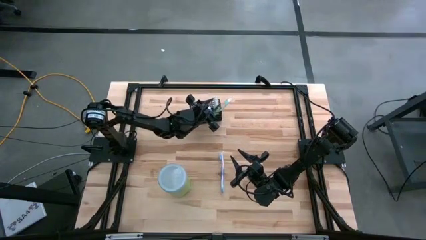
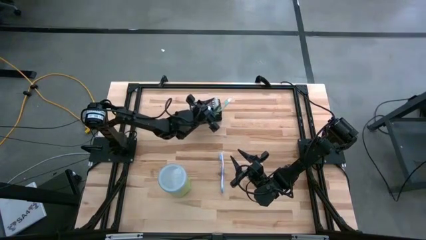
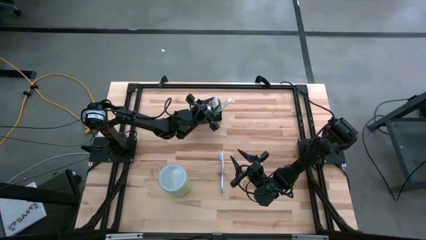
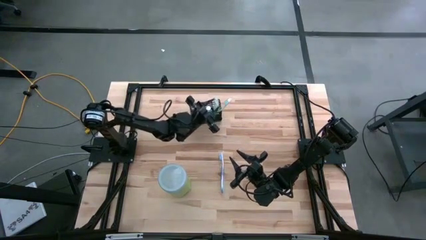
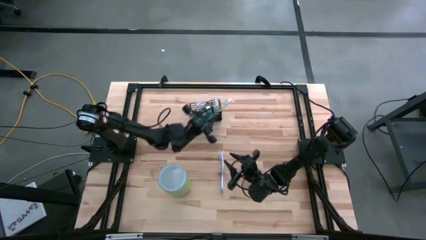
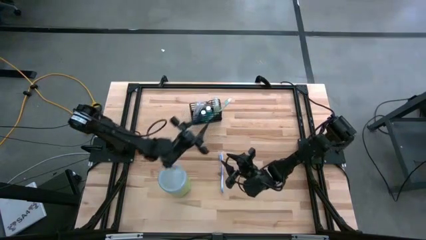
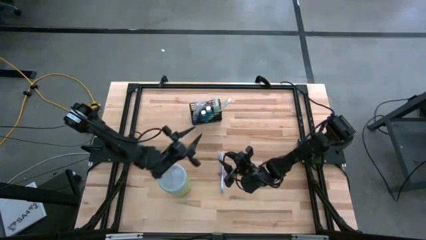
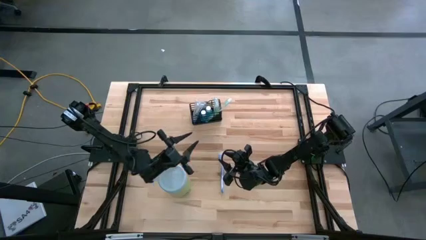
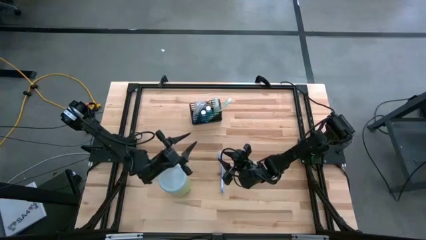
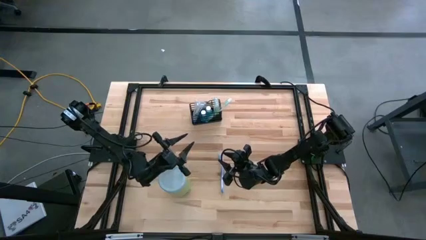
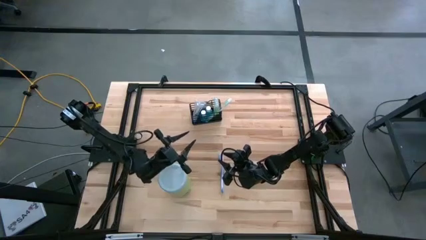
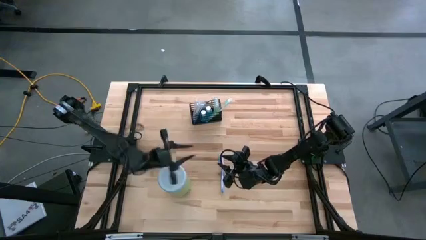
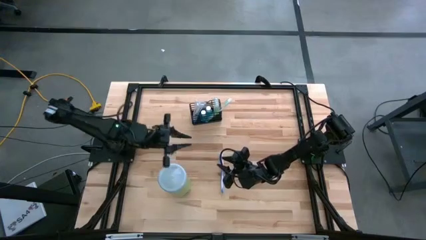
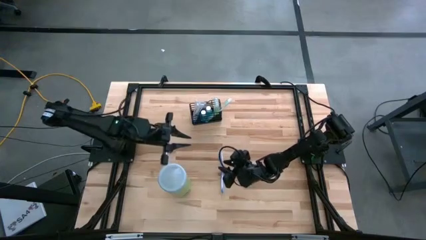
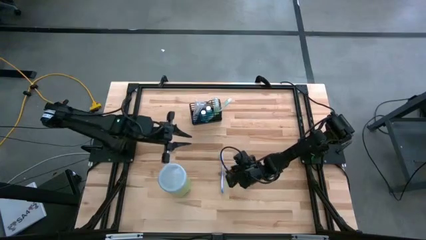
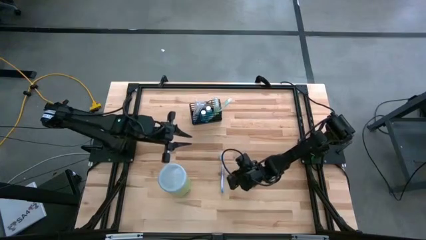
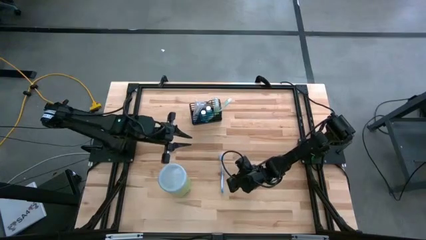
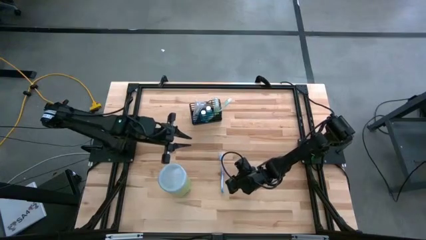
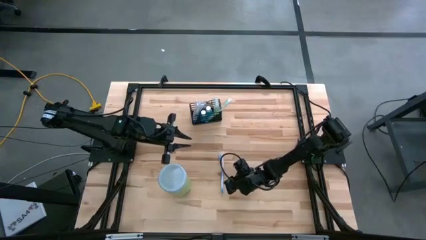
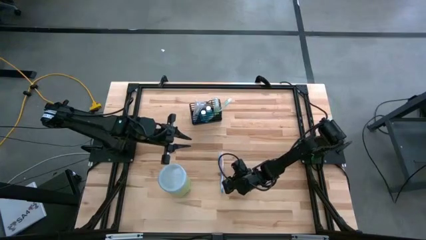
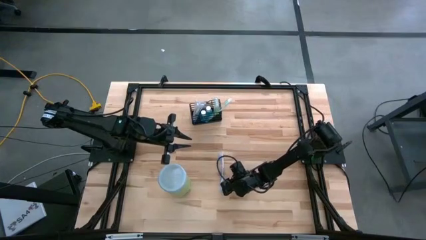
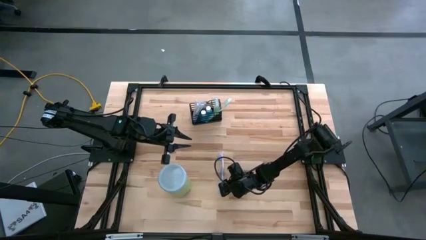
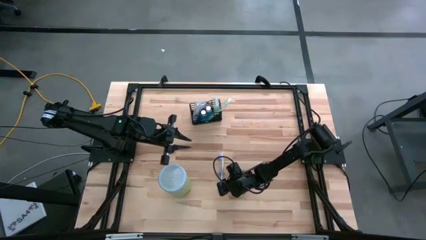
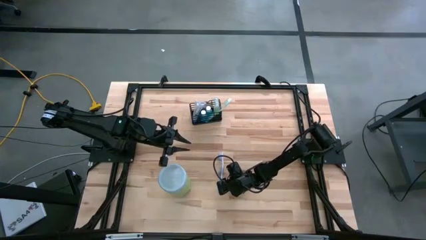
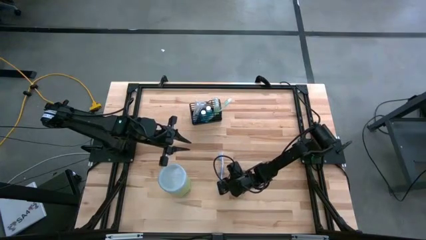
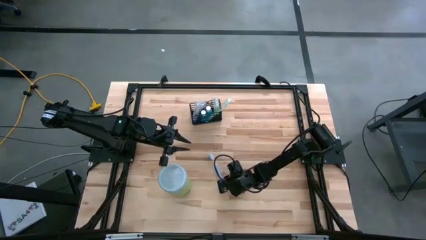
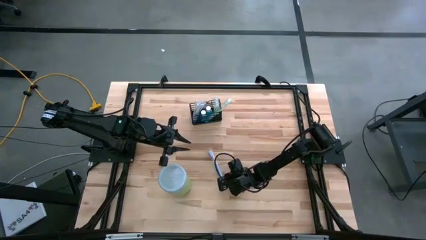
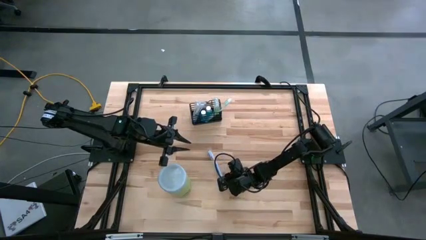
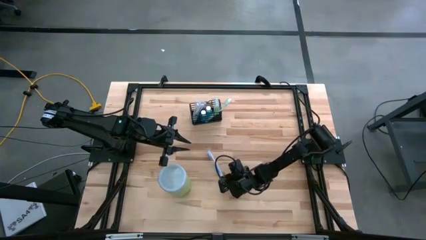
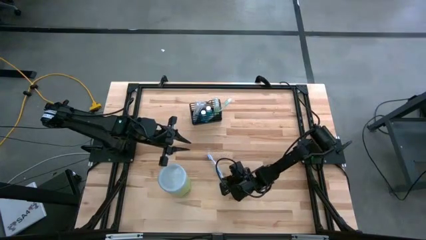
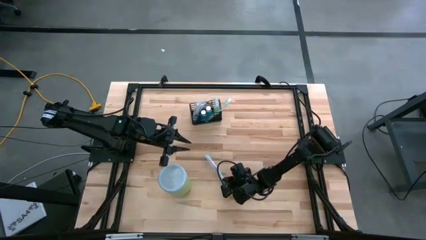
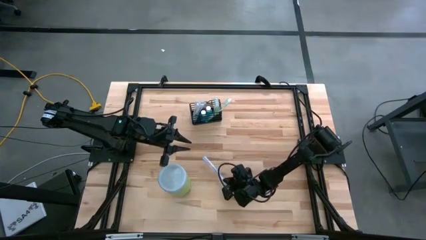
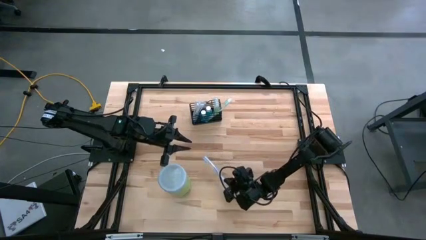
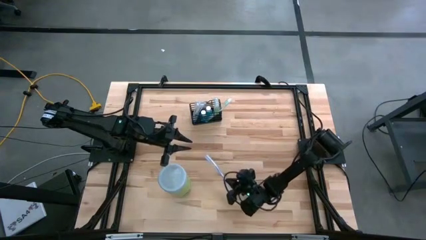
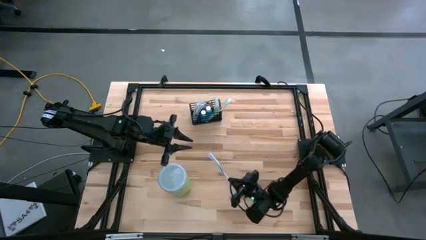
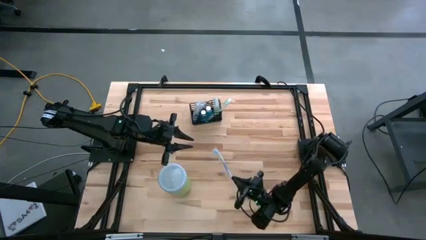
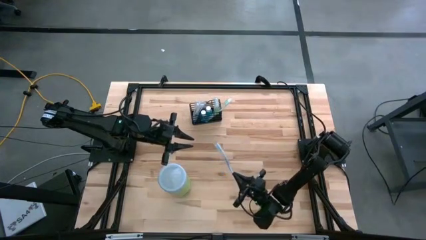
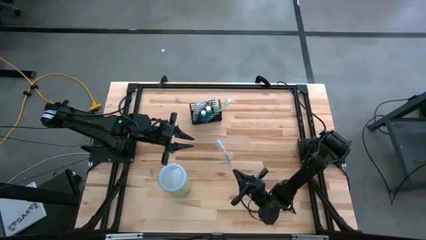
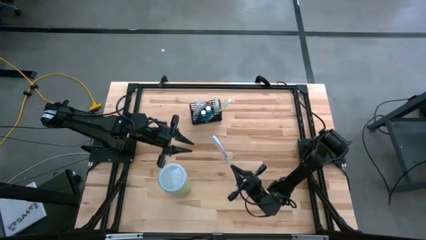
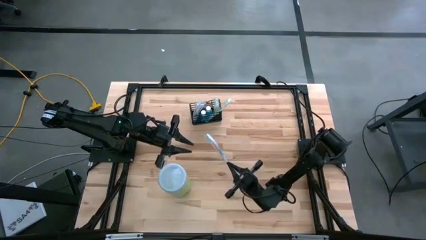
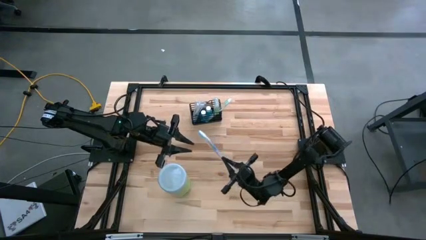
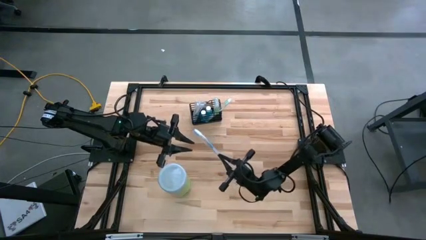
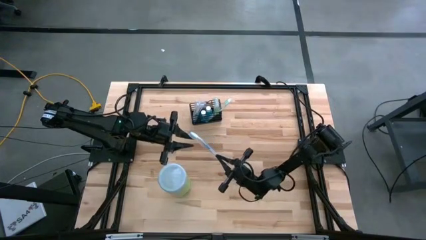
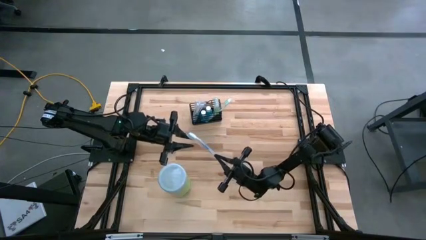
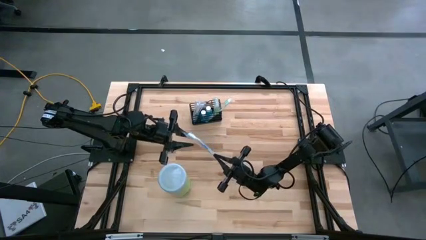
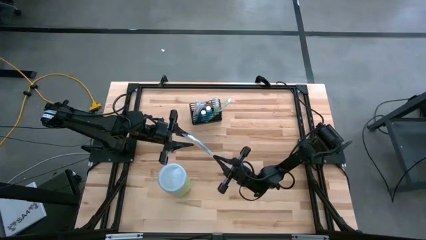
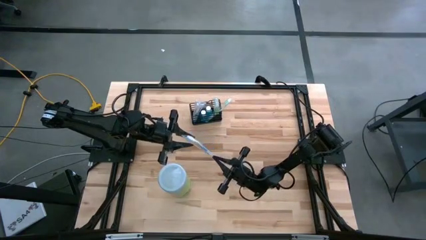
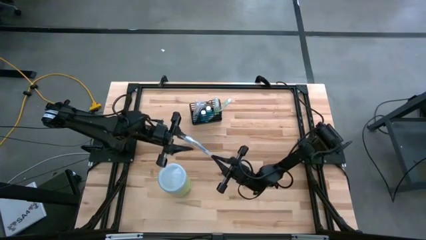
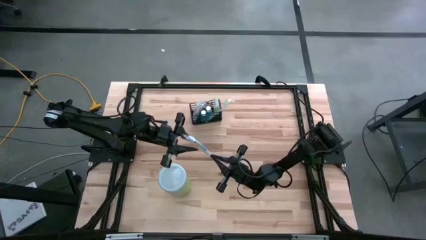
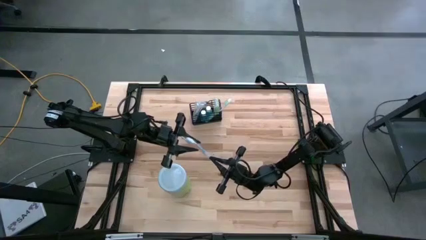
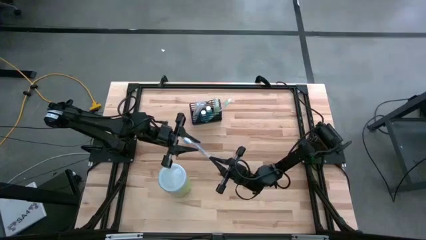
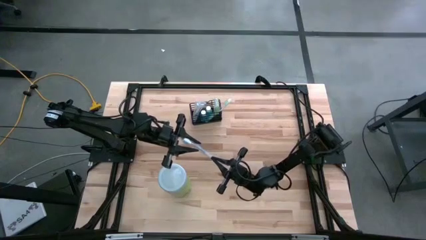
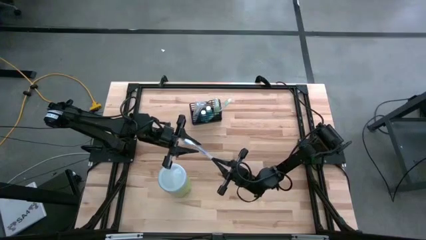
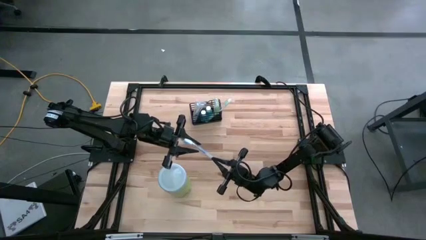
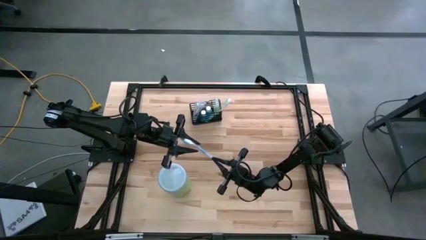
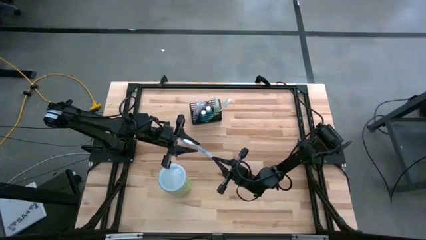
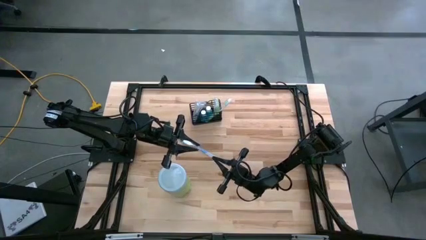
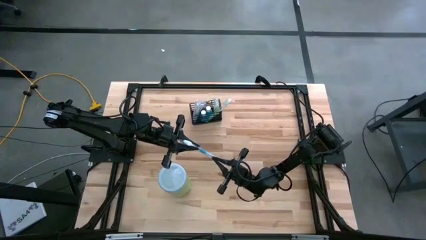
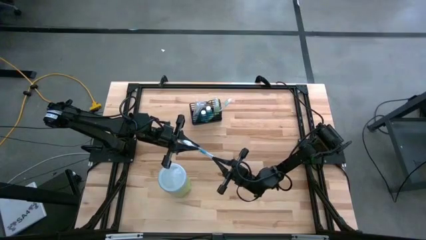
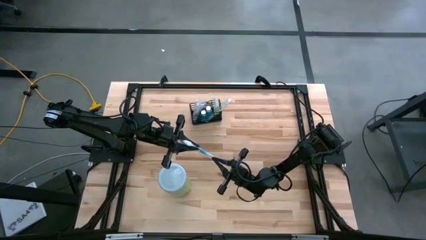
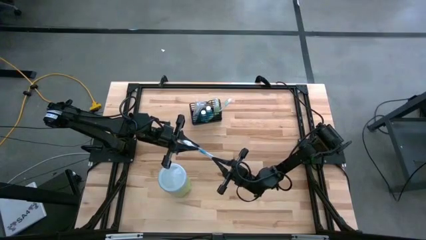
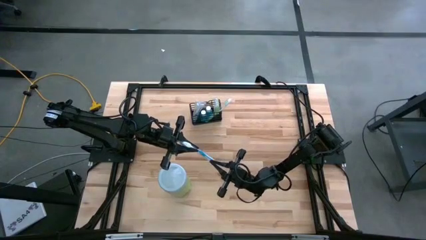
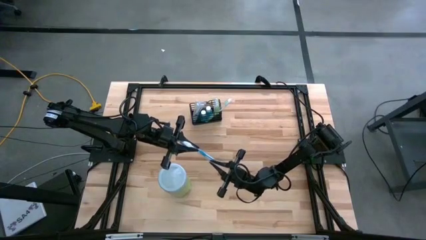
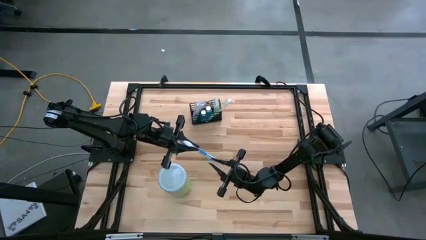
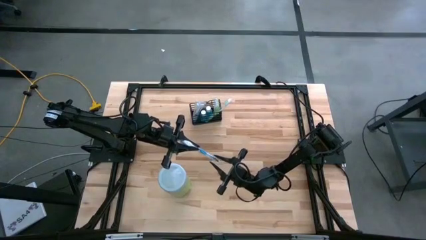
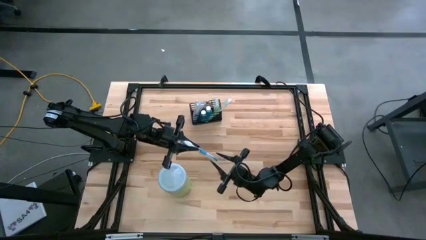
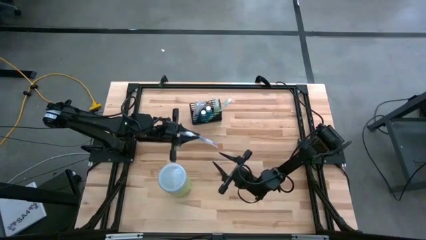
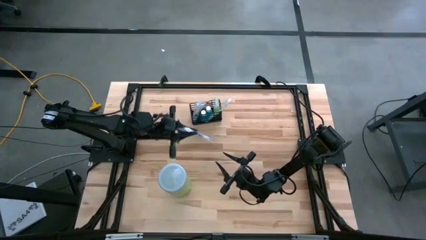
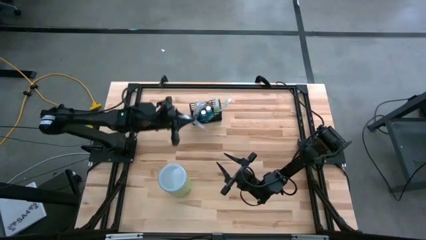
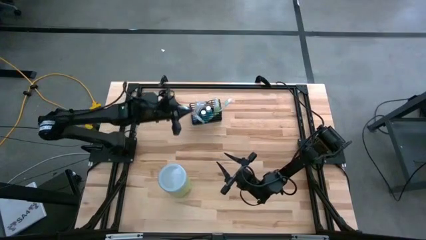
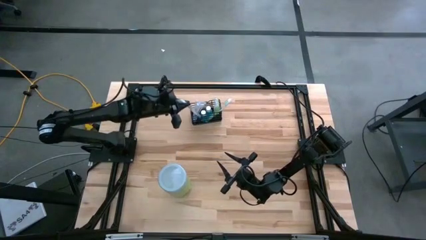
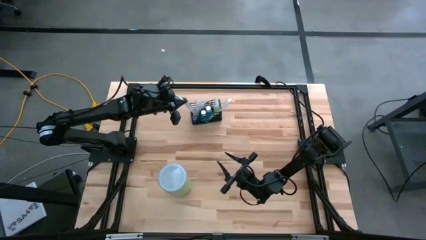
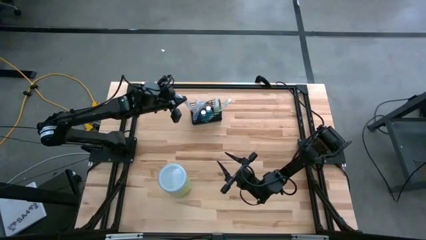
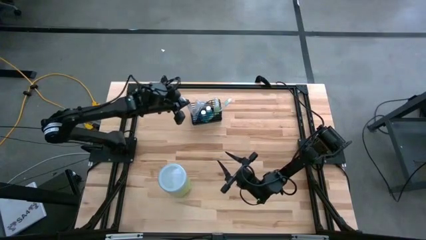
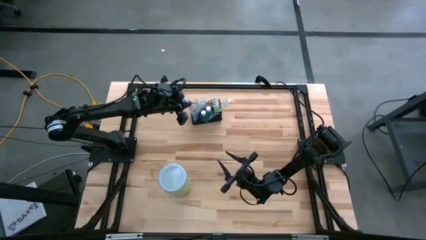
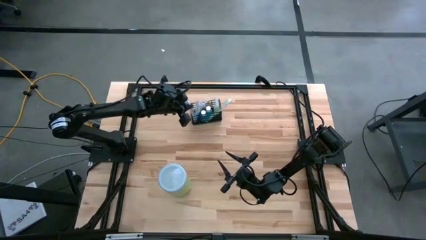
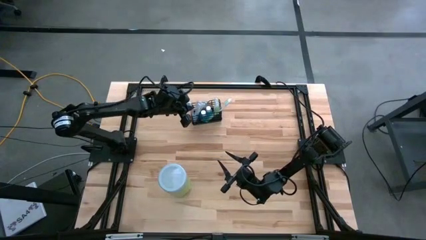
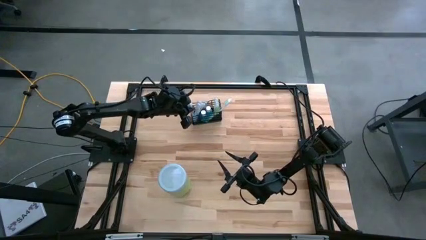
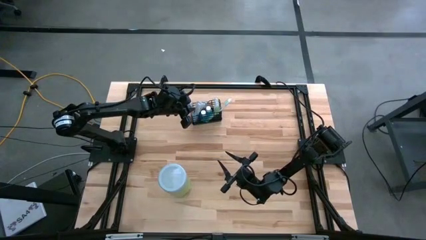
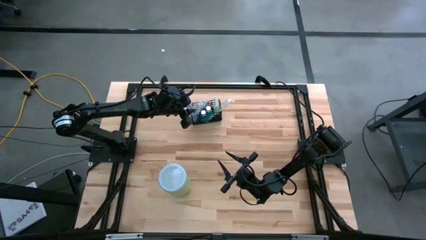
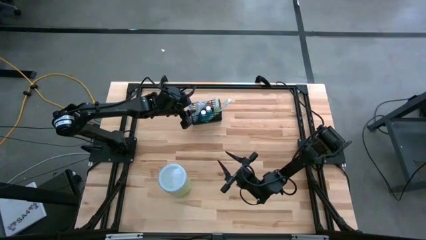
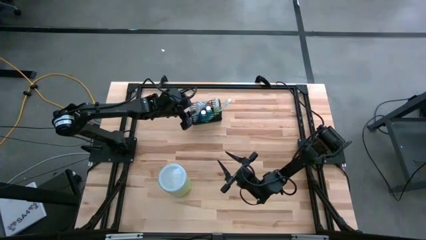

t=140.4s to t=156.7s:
Task: Pick & Place toothbrushing station
Put the blue toothbrush into the black bin mesh mesh organizer

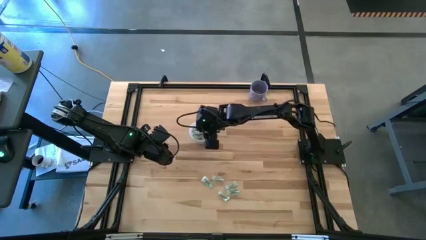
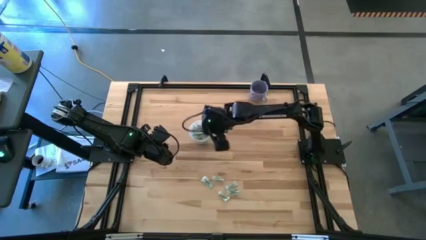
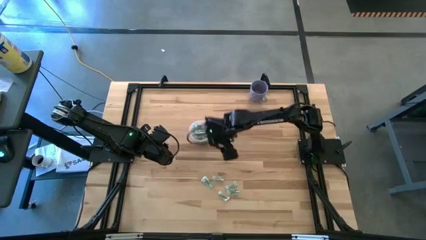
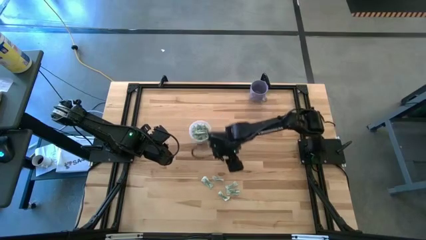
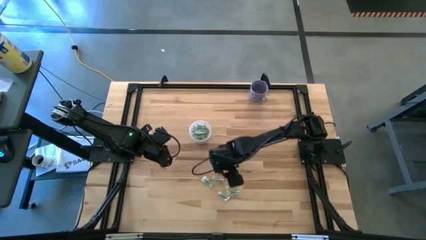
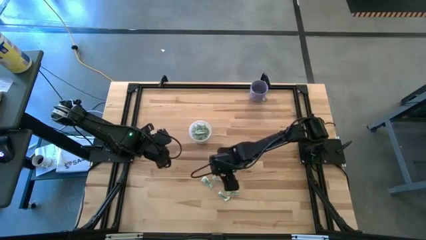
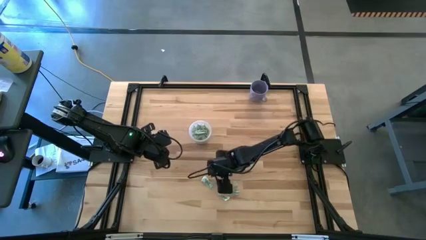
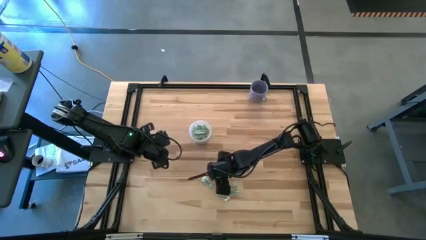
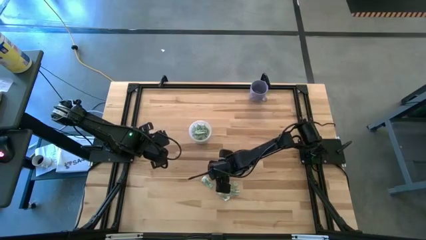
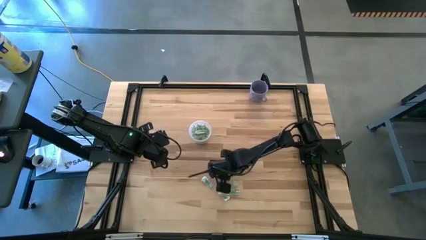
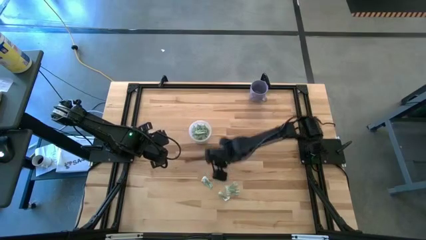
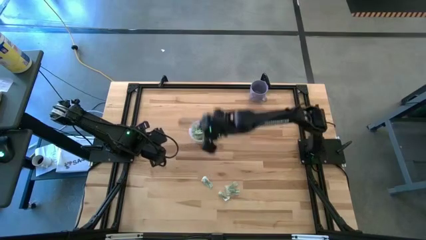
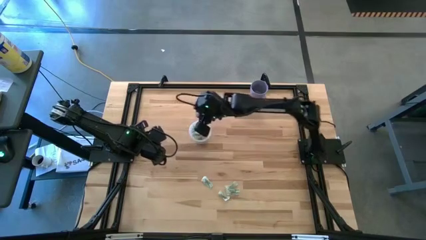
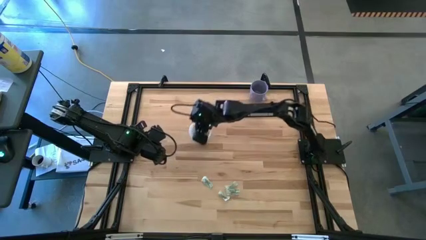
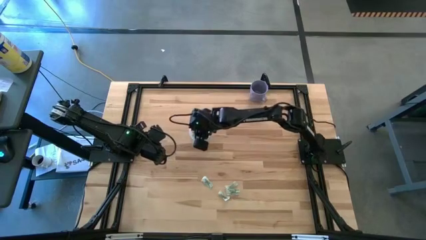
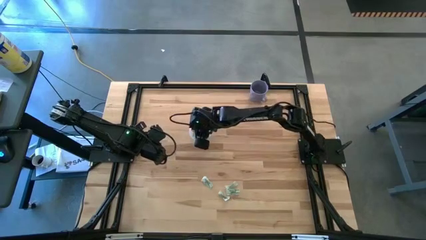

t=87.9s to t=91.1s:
Task: Pick and place Stevia / Truvia into bins
Put the white stevia packet into the transparent container
